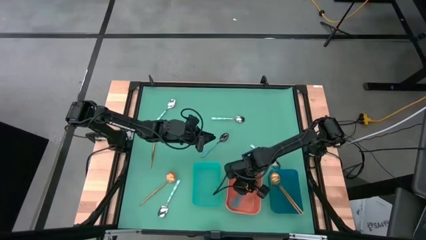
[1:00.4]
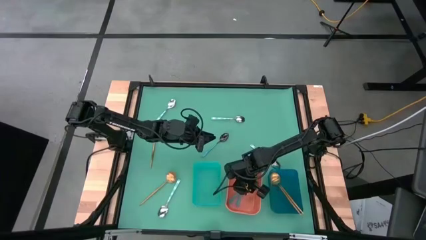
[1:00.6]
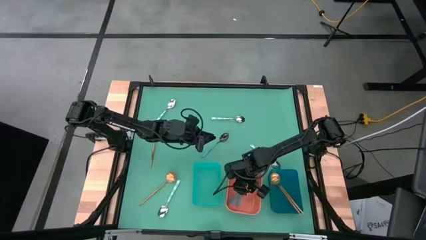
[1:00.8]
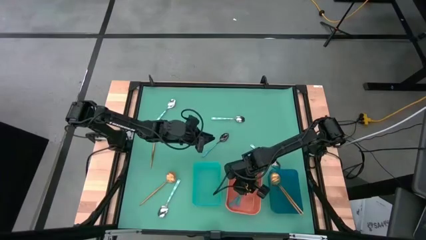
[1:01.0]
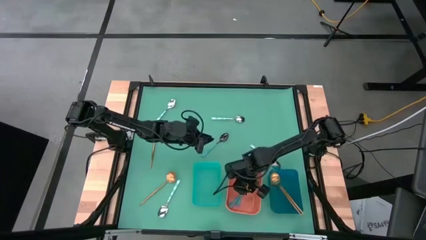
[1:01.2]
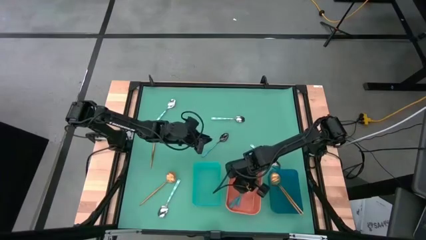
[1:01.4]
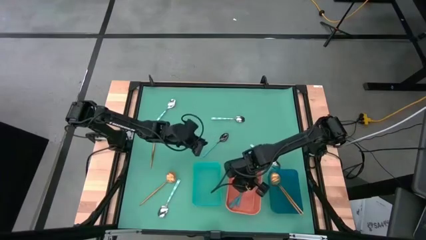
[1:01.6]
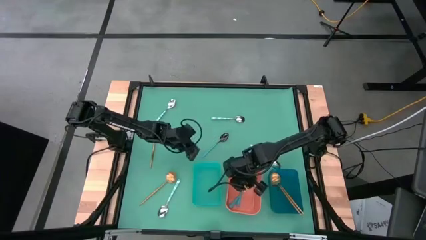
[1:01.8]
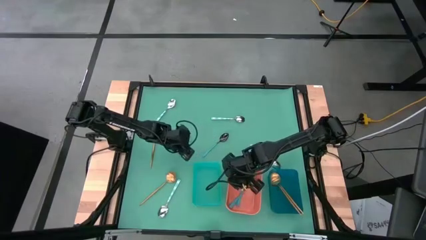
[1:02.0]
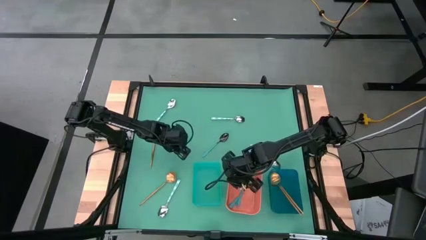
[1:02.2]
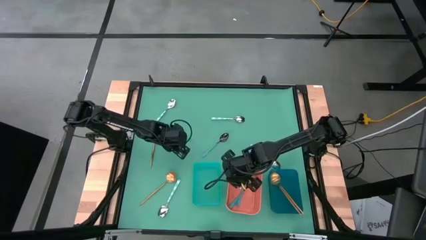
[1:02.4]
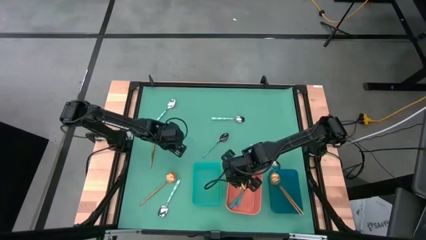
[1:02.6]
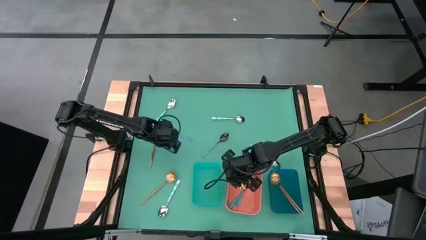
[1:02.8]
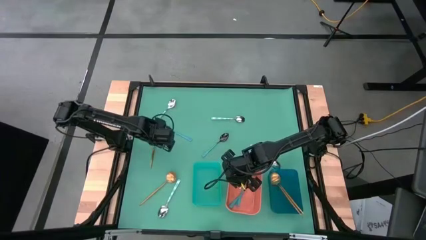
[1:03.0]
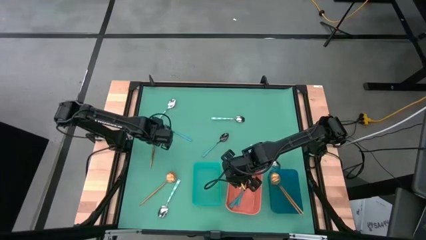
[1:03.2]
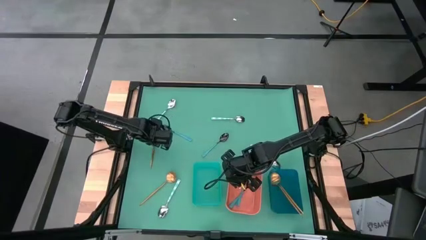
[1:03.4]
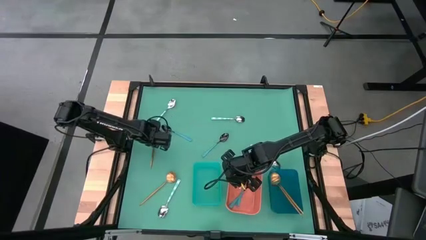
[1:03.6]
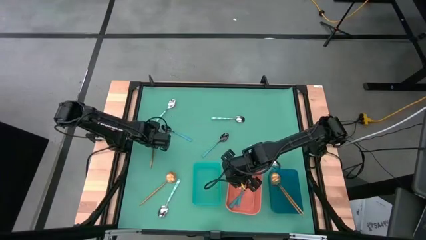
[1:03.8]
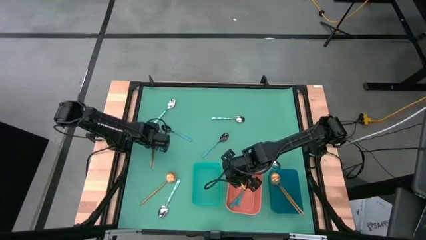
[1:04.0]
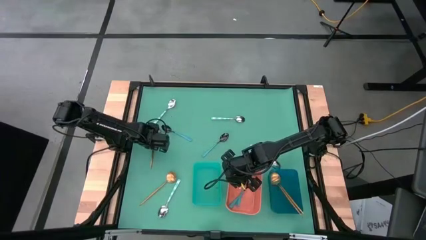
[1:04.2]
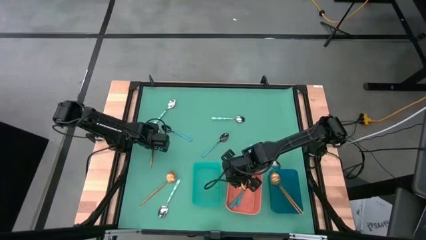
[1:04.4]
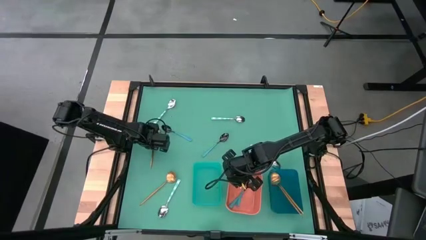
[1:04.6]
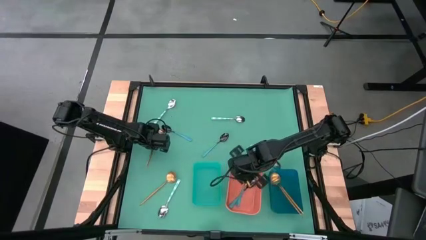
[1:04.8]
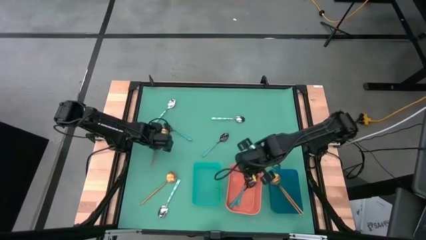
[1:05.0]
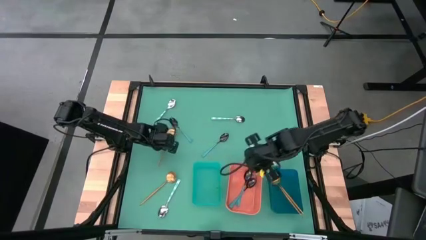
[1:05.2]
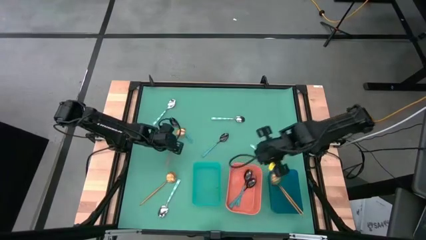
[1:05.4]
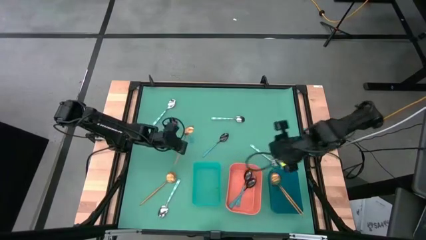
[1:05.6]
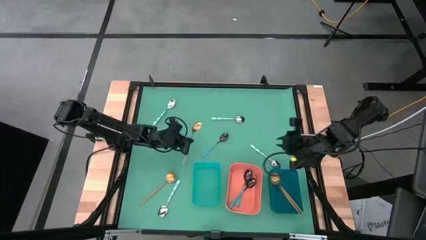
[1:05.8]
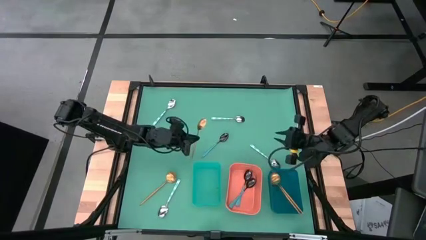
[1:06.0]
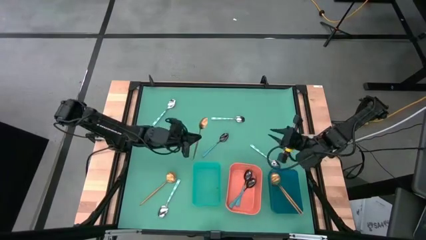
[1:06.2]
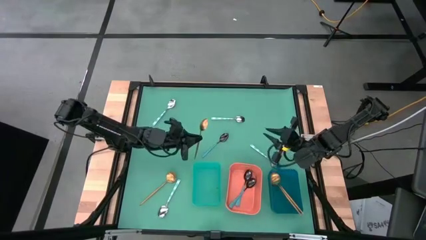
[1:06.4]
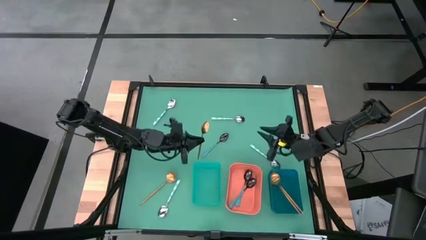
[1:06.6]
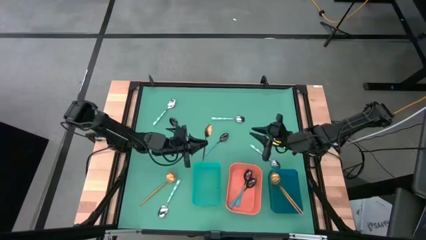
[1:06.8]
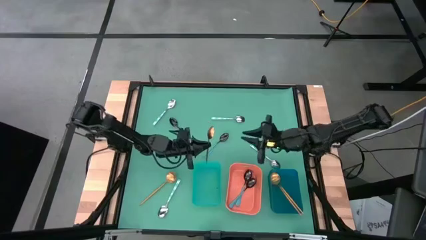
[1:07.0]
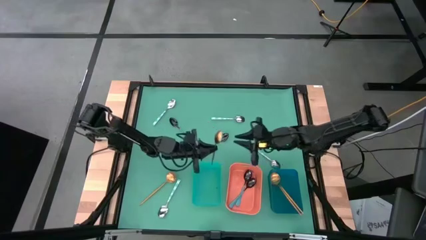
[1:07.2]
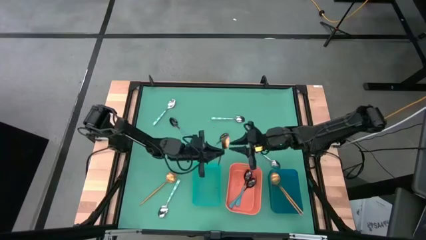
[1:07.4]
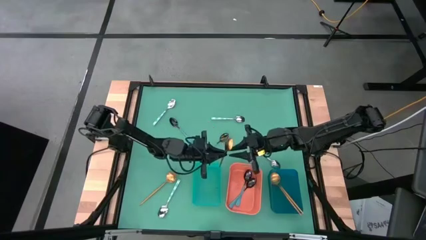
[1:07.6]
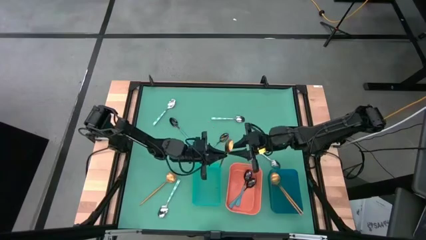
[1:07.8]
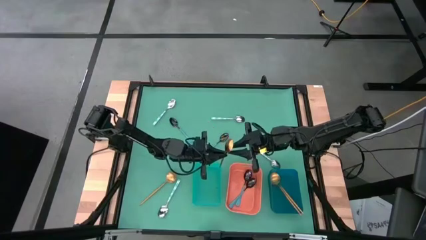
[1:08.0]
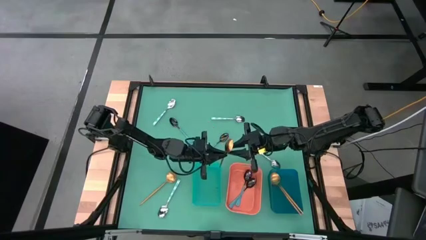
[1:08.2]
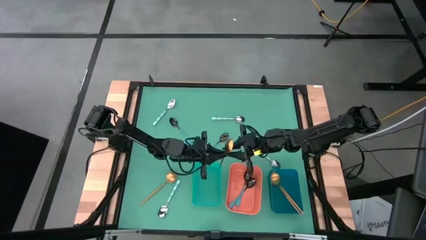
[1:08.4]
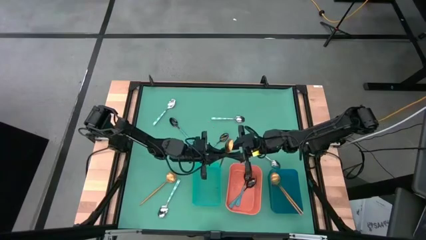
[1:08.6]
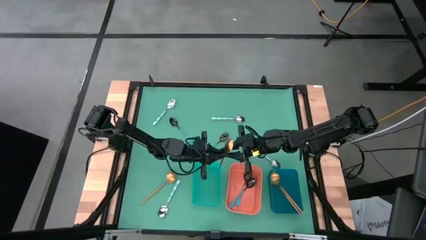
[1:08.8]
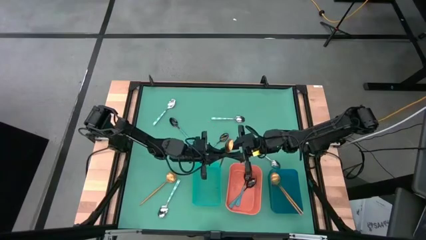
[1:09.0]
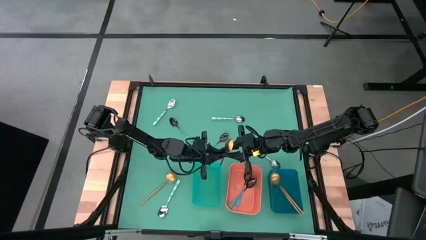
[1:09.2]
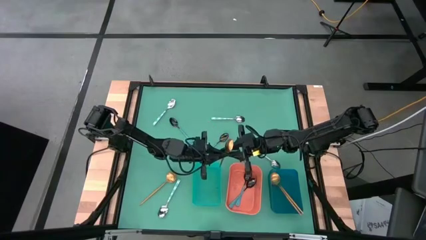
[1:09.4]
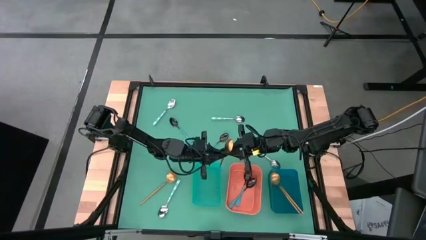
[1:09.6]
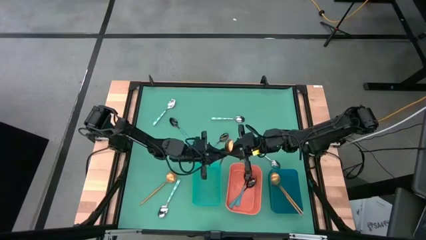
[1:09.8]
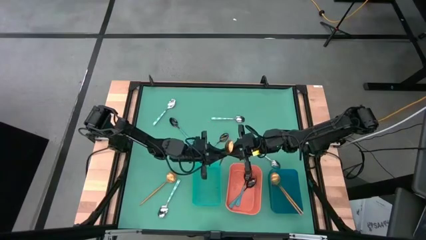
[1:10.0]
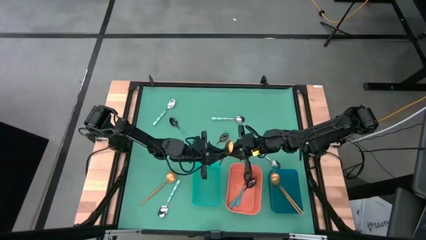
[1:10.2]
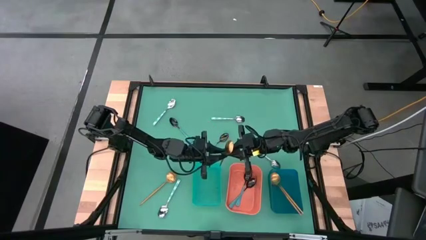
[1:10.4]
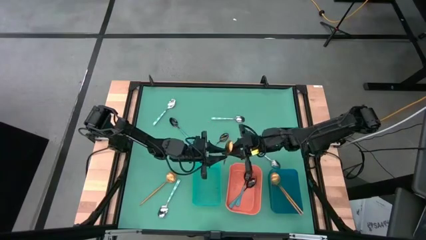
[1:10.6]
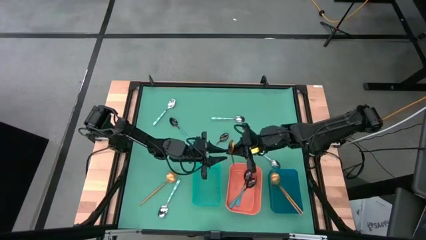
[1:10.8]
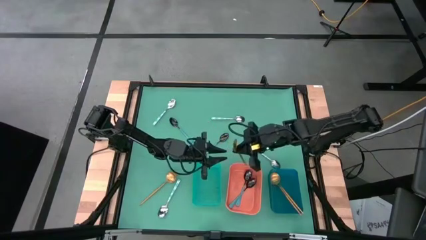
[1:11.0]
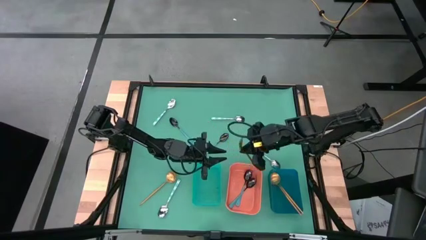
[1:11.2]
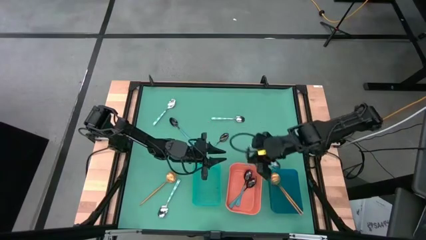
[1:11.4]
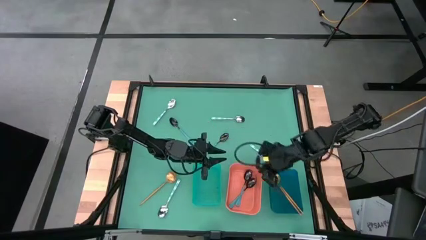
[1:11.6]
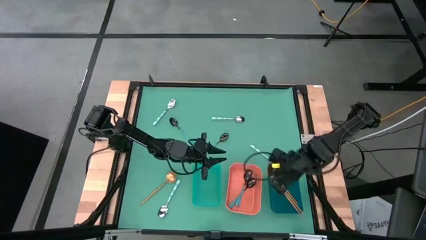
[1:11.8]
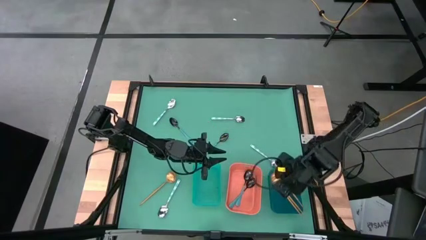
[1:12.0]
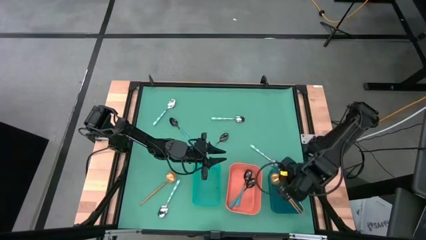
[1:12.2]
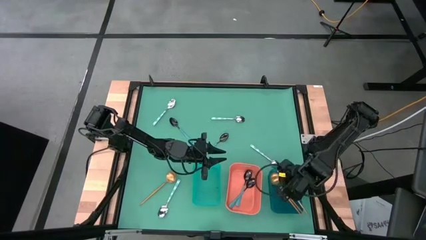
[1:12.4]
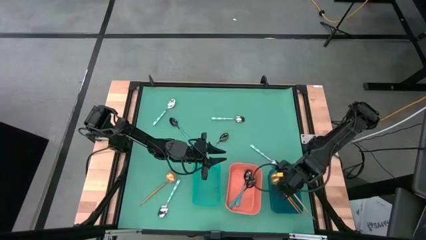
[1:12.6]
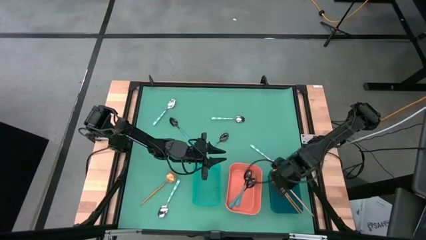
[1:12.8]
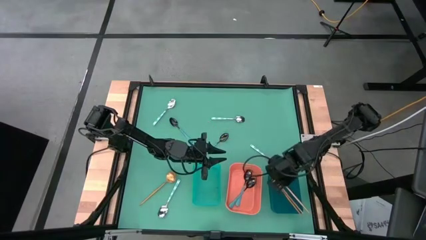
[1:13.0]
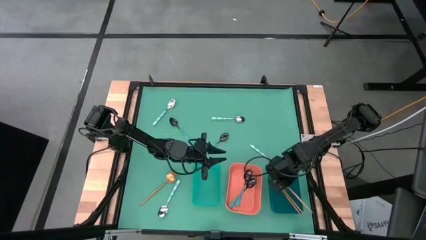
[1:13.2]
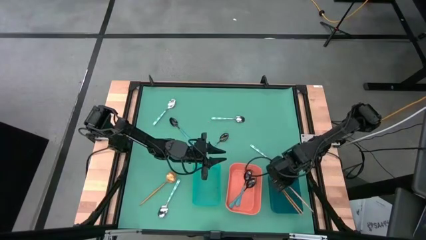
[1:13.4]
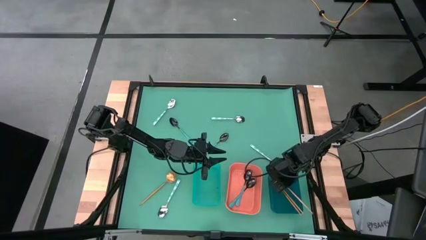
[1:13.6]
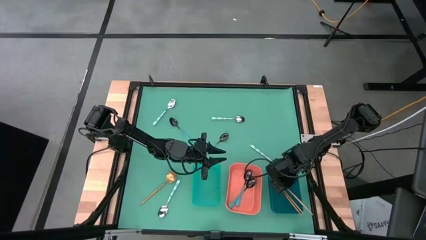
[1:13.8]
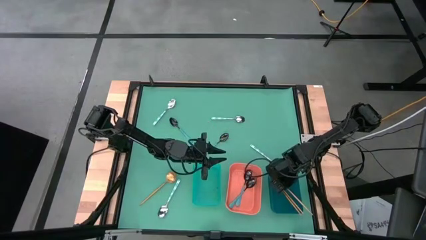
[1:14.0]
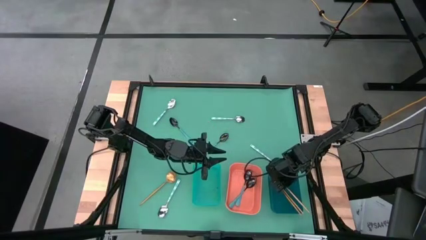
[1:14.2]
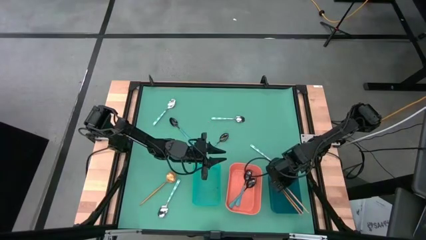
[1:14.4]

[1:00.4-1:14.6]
Task: Sort silverware by color (type)
Put the golden spoon into the blue bin
